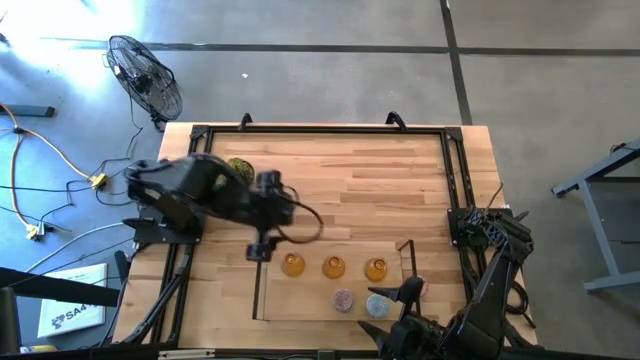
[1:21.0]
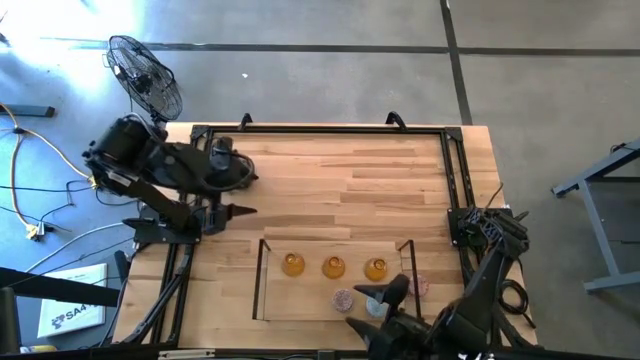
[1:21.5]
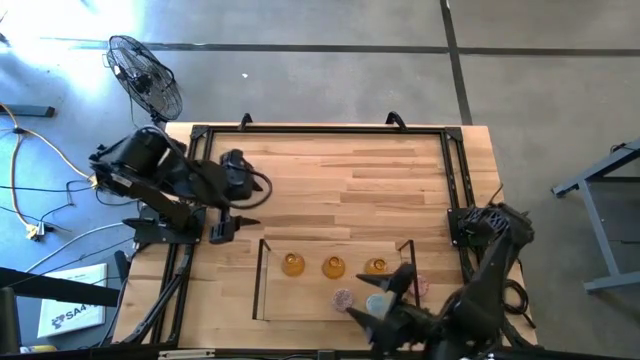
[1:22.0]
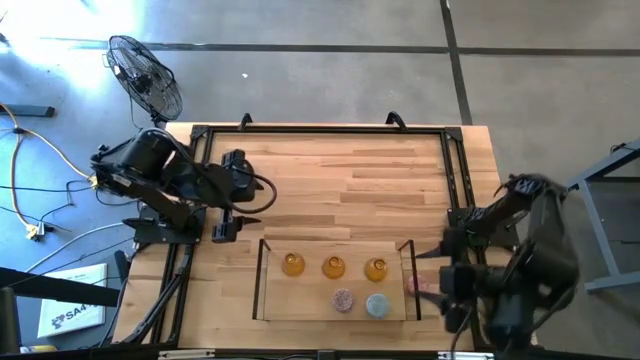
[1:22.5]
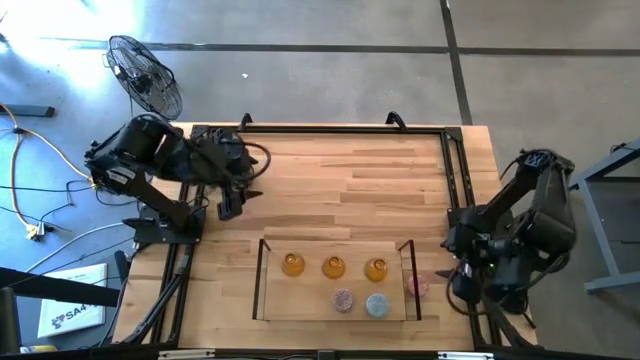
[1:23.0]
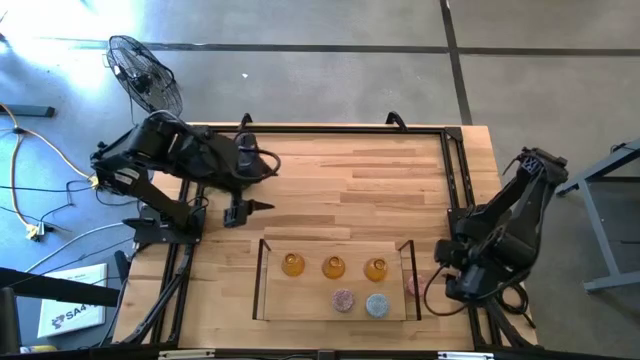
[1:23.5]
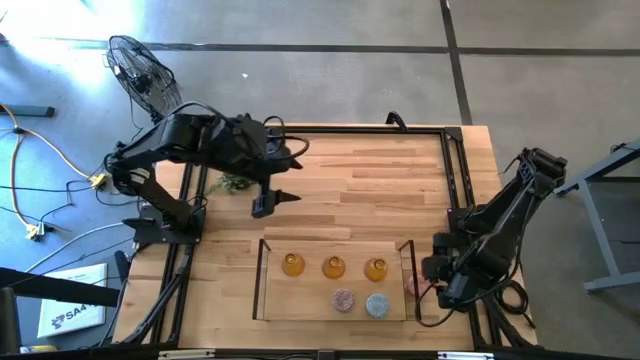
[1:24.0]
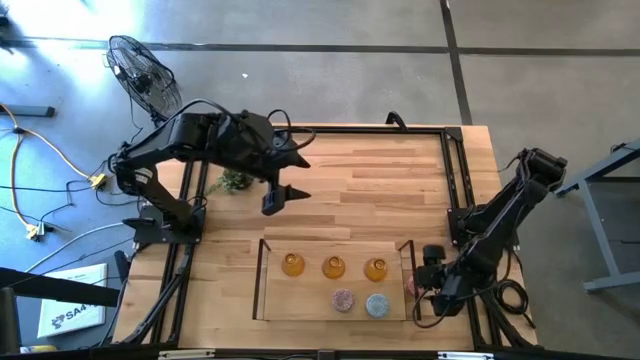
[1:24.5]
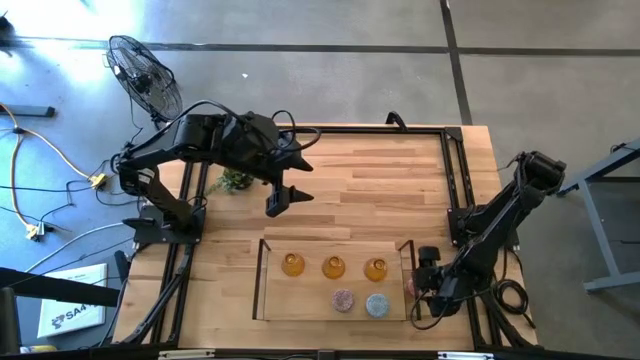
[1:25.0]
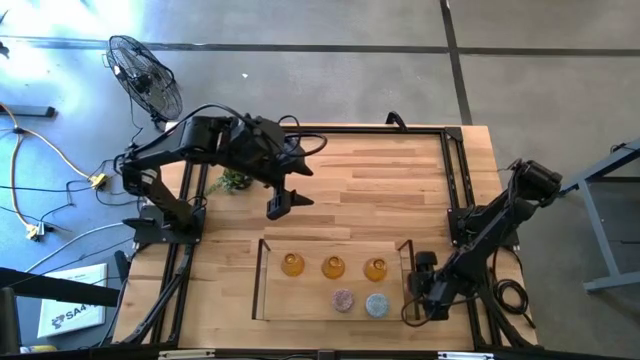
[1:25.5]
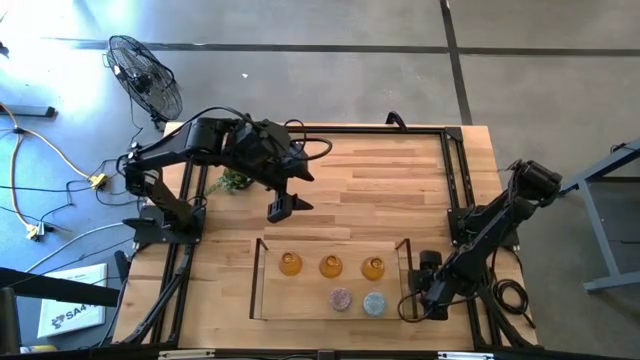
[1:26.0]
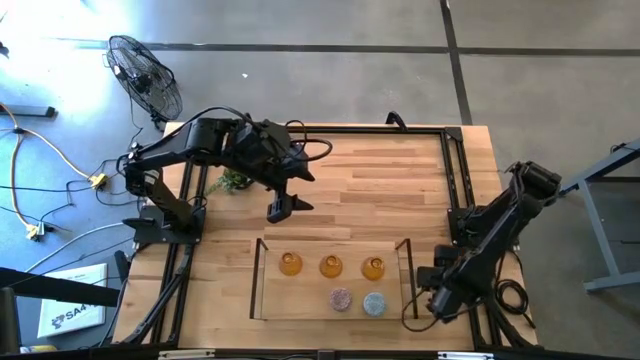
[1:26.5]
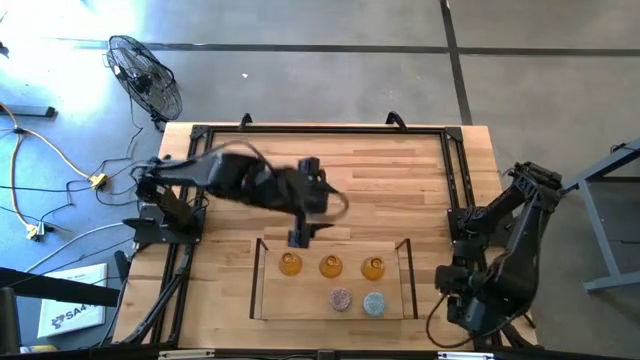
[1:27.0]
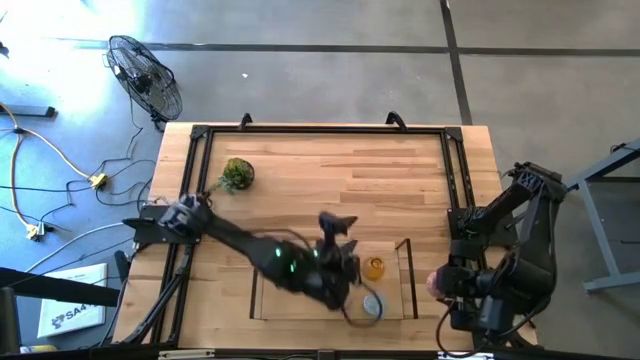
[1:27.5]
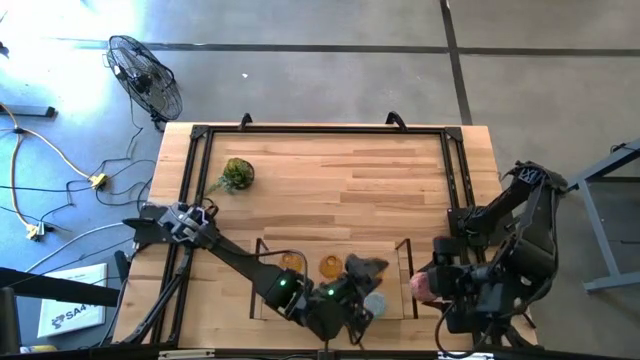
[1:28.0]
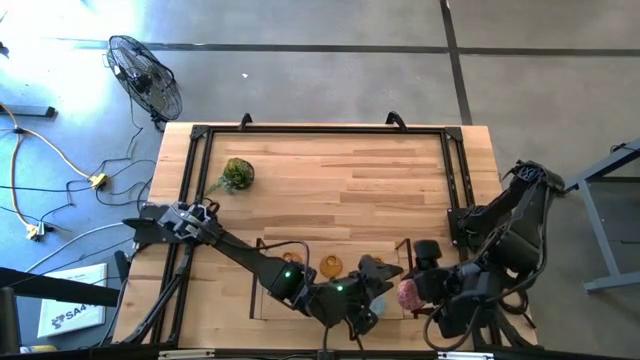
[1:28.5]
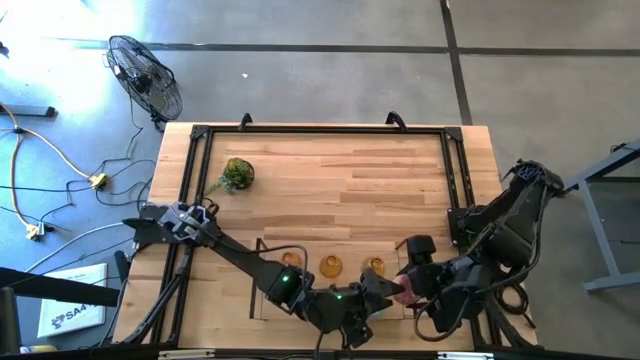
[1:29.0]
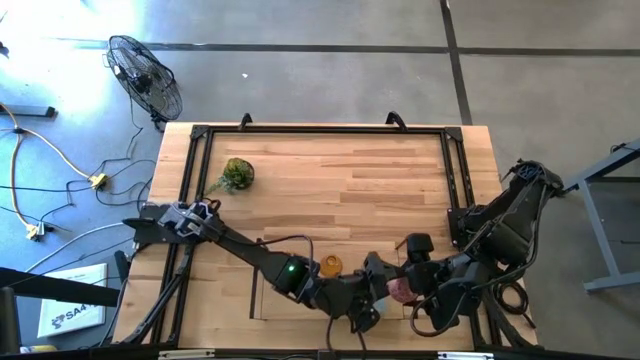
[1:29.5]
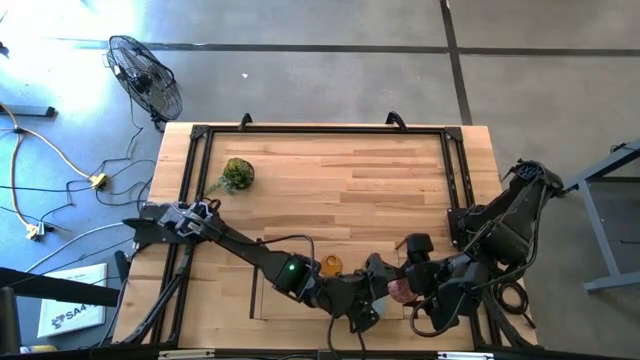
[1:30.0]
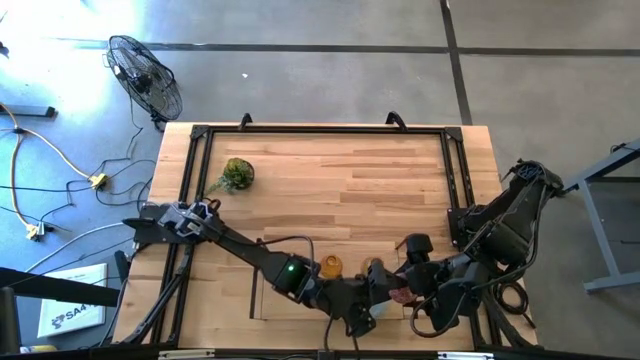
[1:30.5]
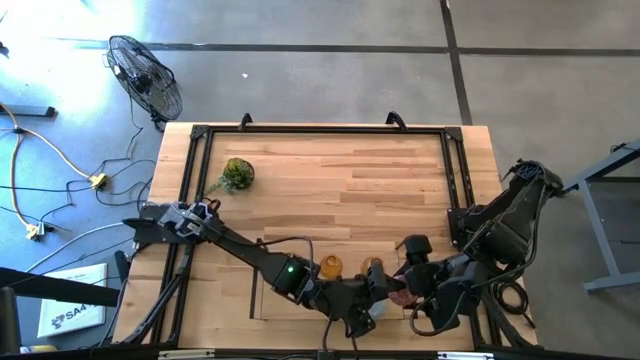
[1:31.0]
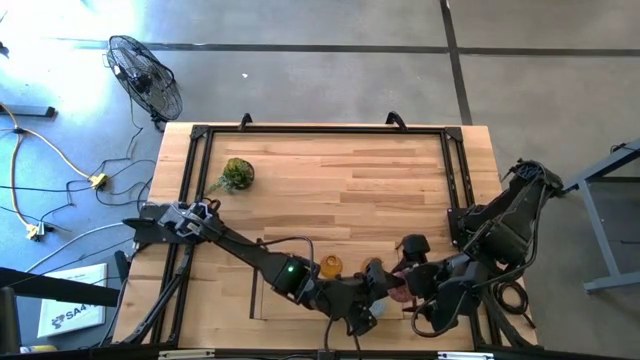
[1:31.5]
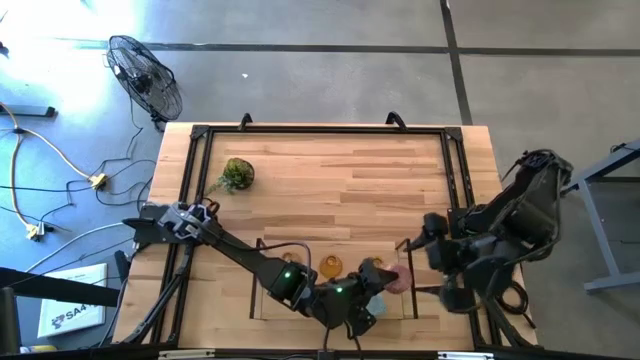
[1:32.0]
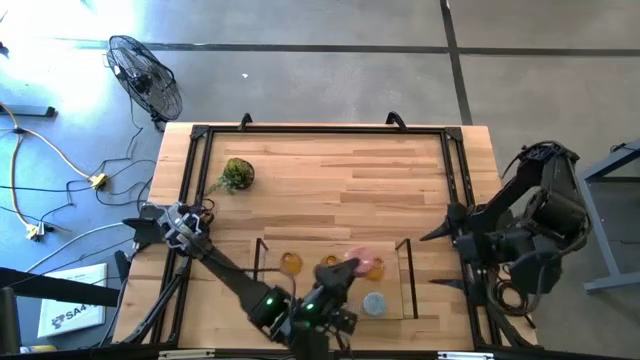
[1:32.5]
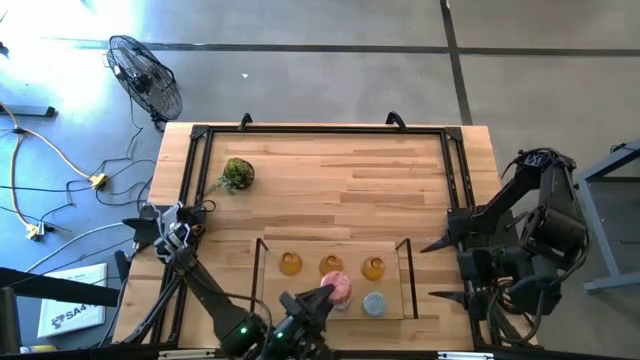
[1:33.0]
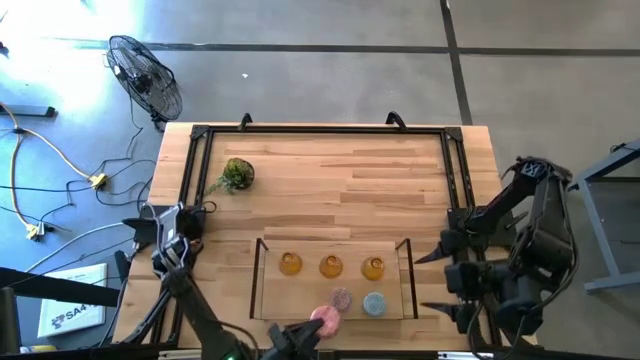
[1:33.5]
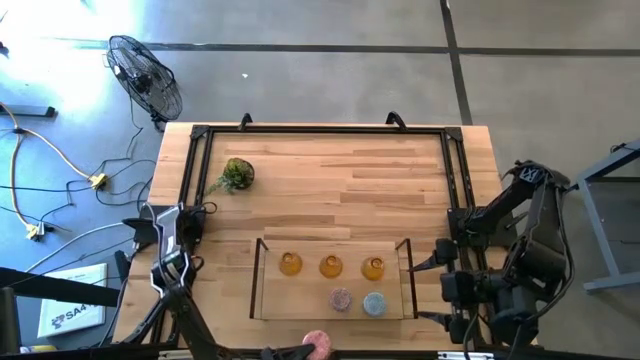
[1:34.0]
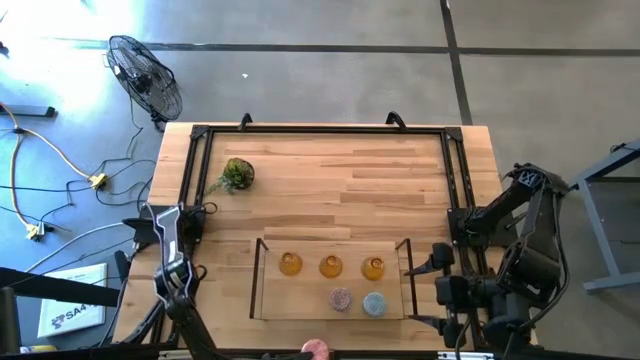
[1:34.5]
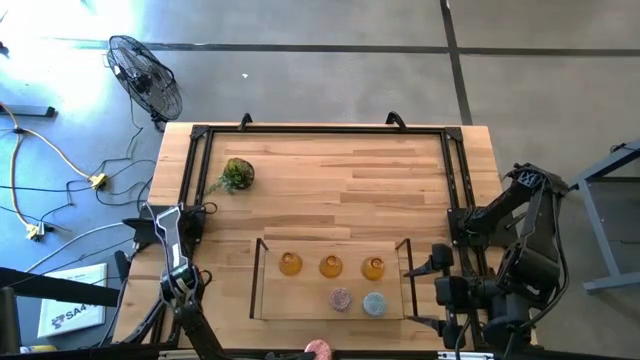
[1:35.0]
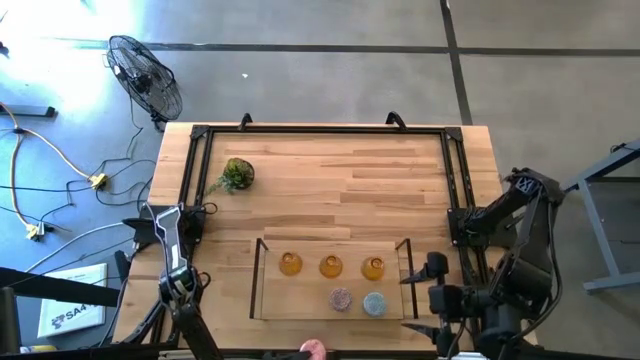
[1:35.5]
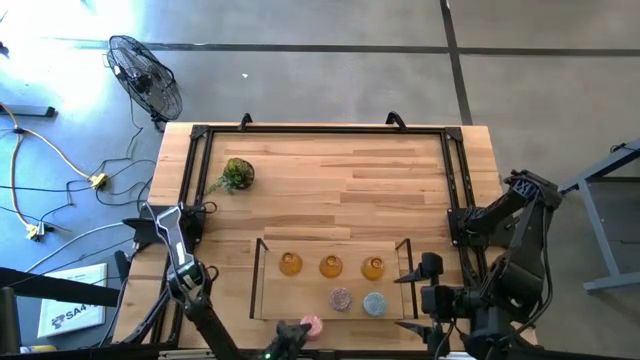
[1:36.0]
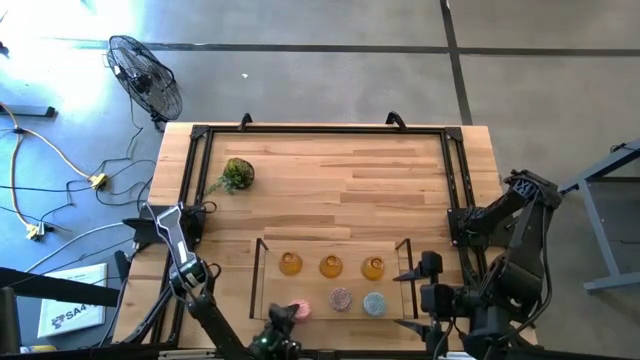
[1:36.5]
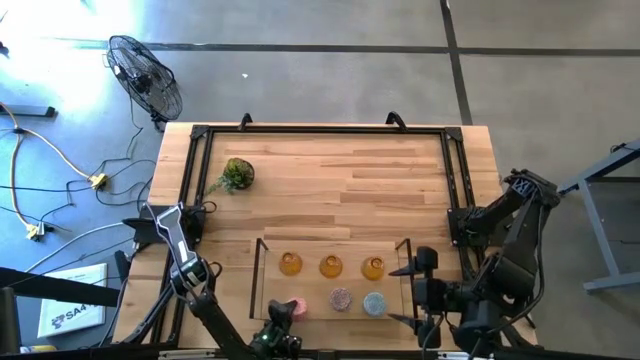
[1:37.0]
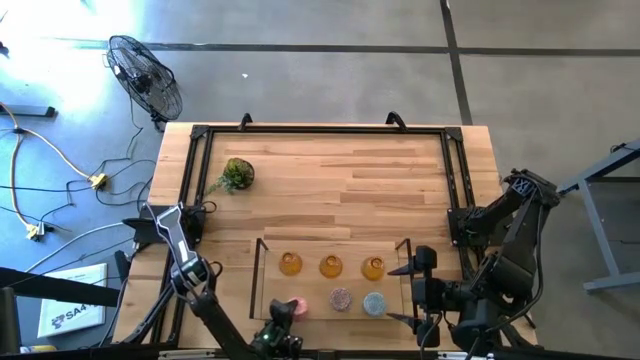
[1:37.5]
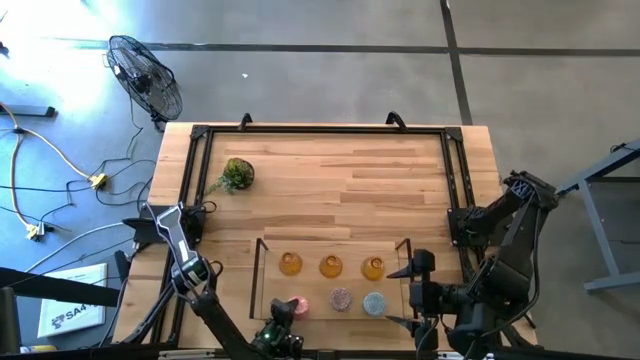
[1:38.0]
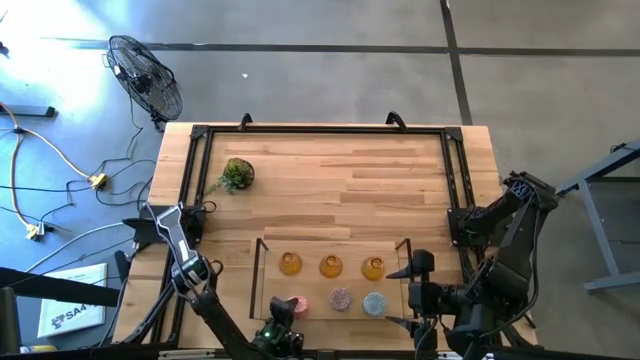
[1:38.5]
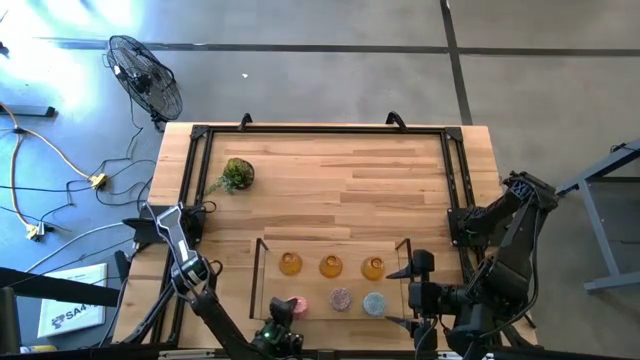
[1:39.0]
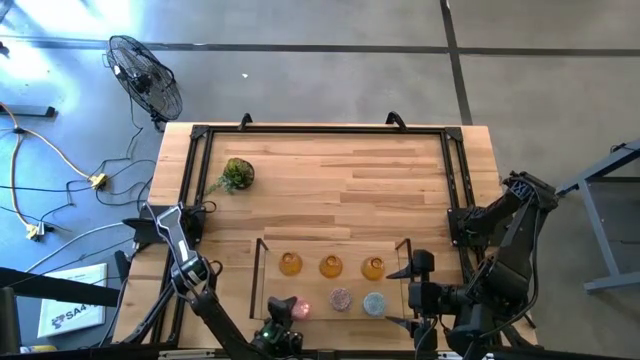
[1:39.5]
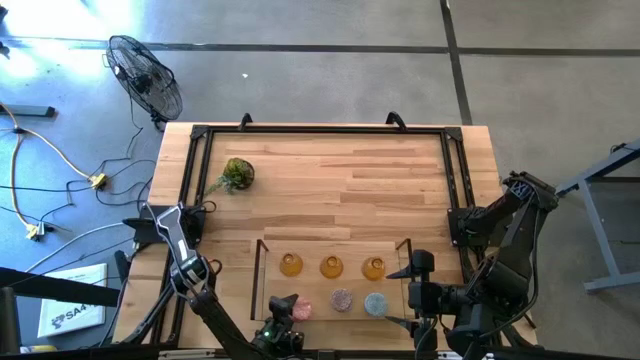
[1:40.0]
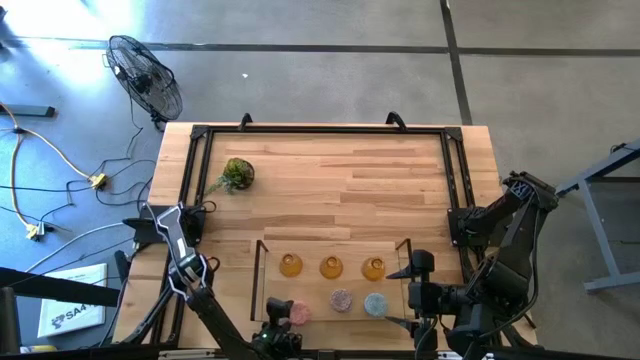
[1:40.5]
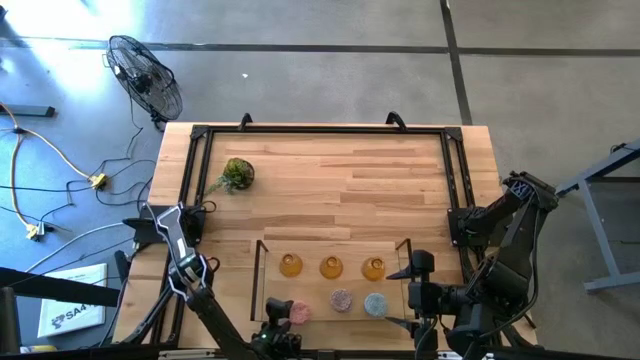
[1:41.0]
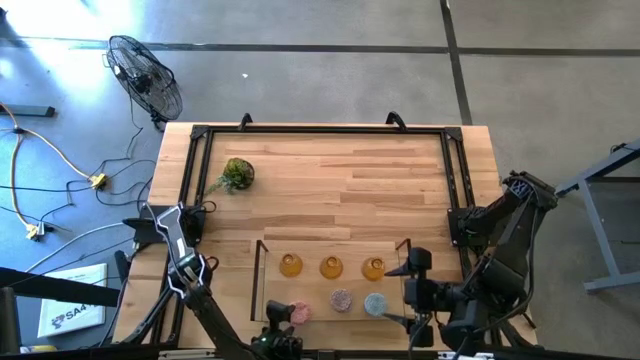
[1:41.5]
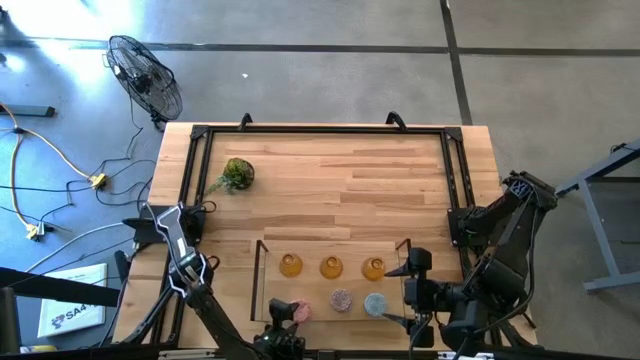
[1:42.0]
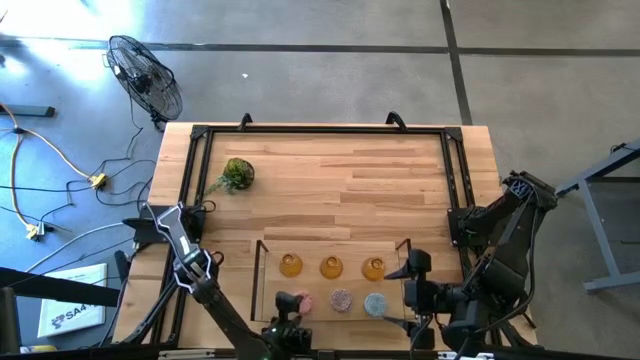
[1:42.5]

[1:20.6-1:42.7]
Task: Pick & Place candle stick holders
Put the pink patterned scented candle on the shelf
